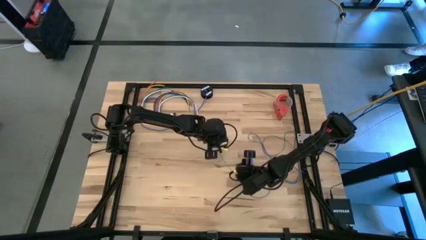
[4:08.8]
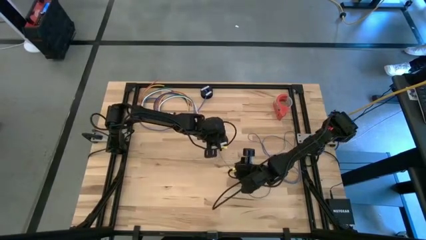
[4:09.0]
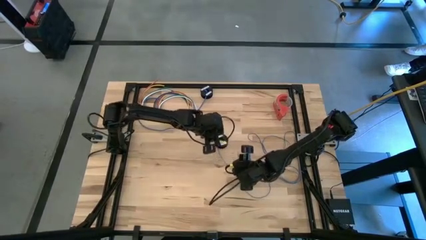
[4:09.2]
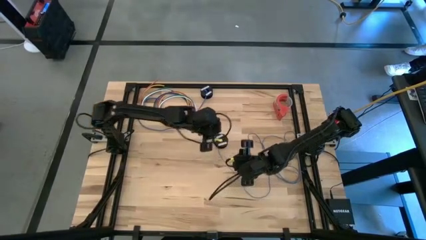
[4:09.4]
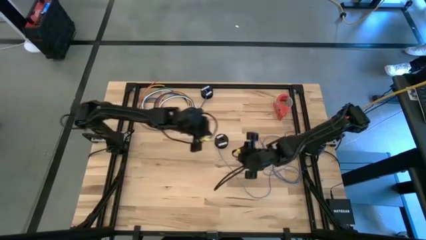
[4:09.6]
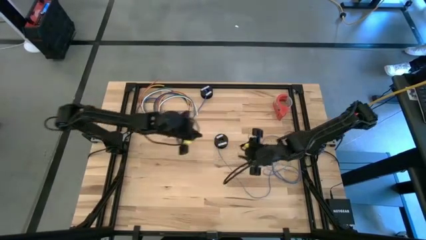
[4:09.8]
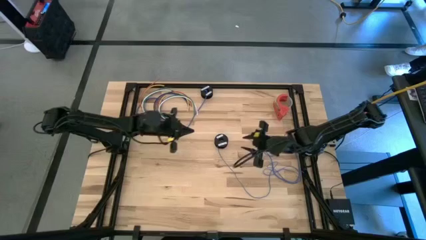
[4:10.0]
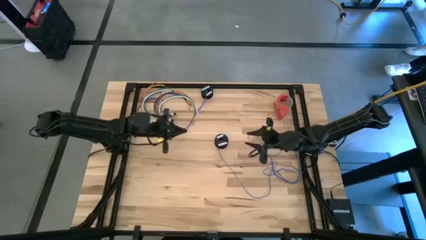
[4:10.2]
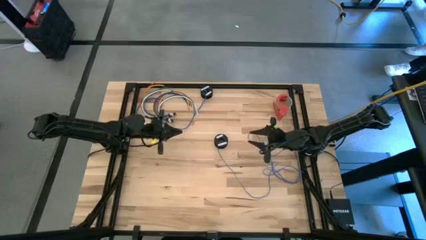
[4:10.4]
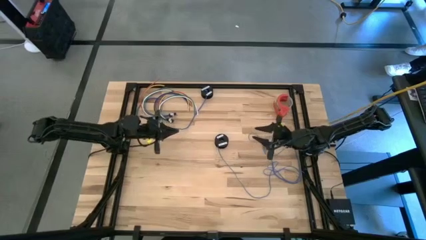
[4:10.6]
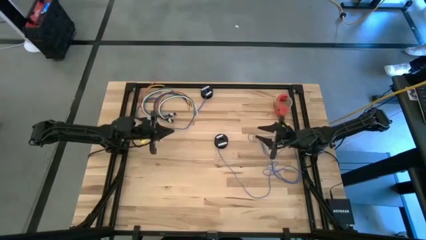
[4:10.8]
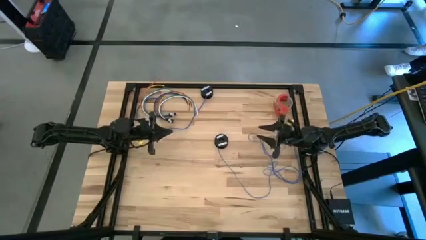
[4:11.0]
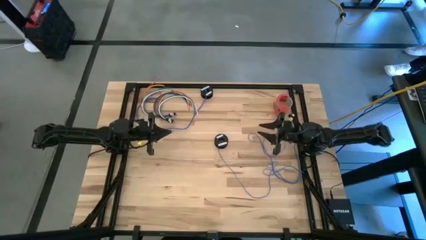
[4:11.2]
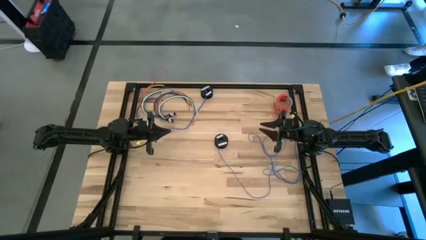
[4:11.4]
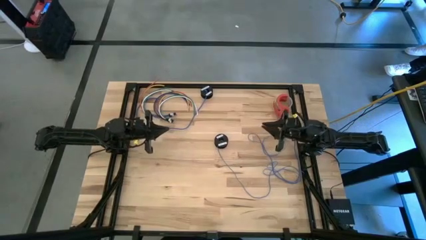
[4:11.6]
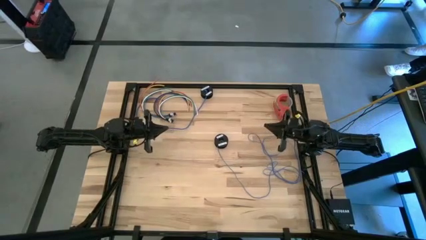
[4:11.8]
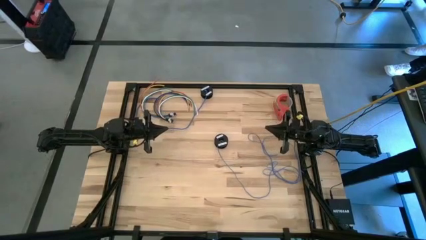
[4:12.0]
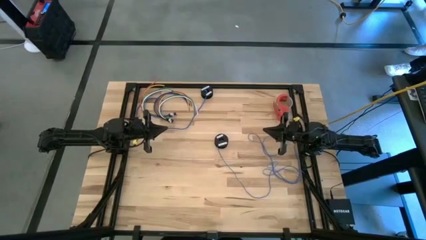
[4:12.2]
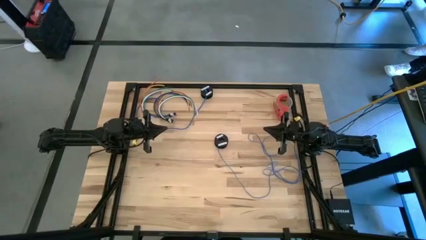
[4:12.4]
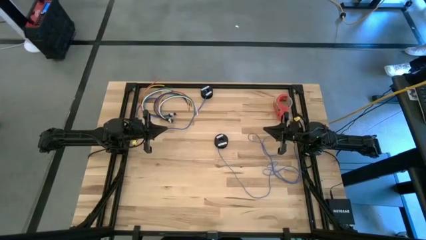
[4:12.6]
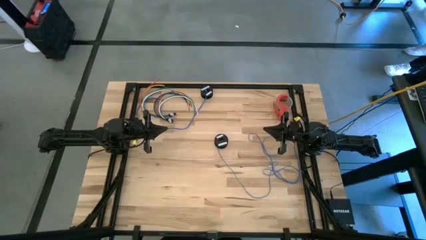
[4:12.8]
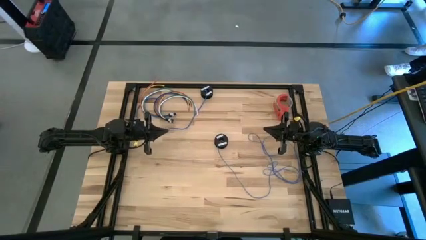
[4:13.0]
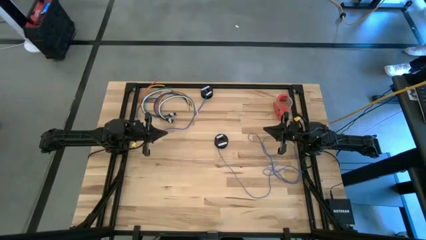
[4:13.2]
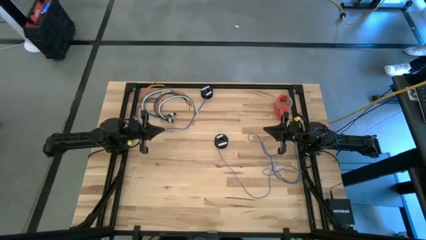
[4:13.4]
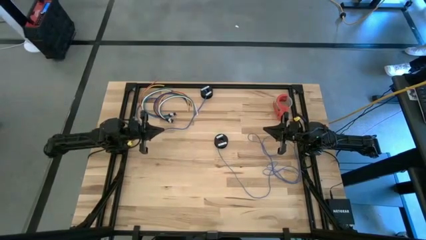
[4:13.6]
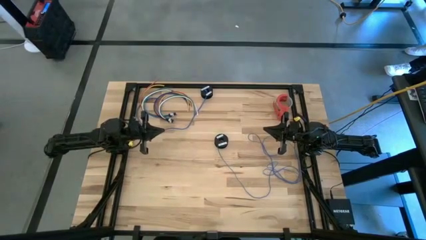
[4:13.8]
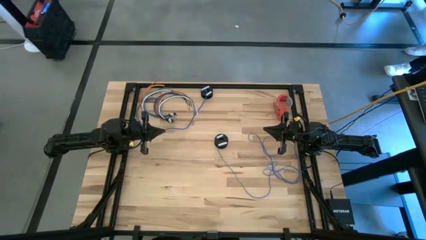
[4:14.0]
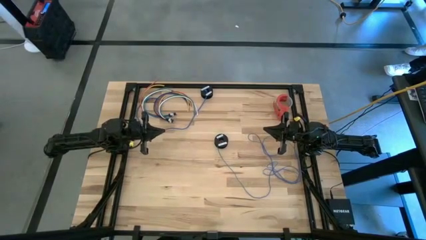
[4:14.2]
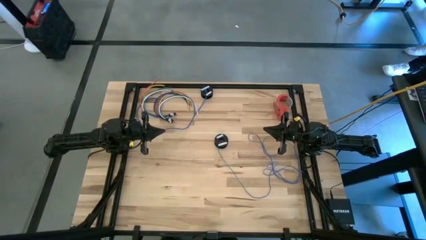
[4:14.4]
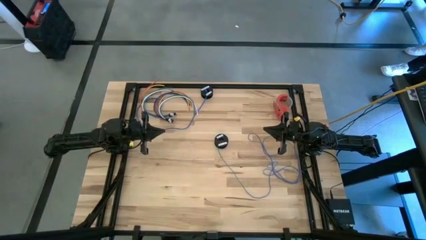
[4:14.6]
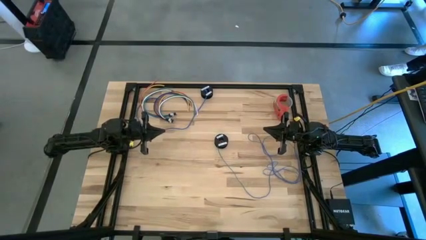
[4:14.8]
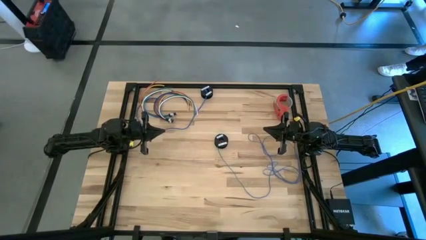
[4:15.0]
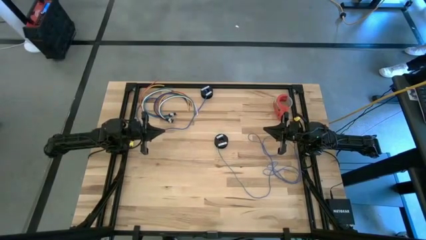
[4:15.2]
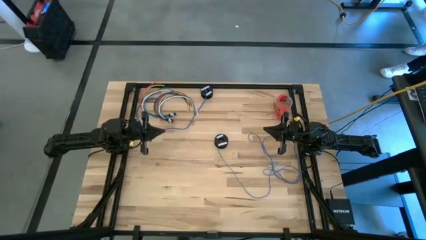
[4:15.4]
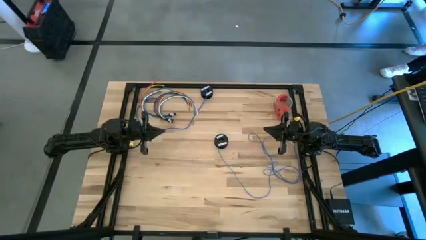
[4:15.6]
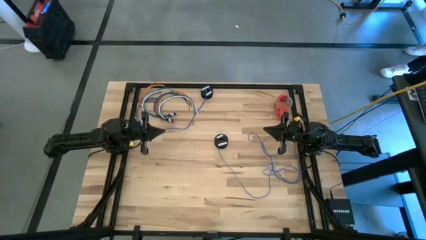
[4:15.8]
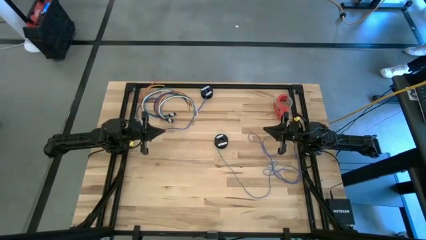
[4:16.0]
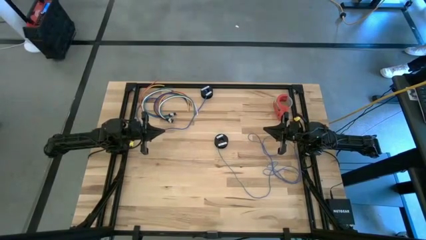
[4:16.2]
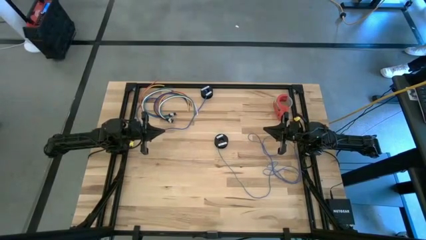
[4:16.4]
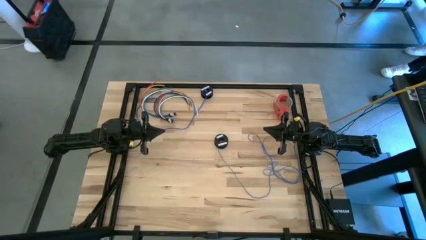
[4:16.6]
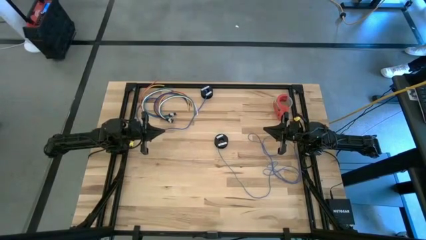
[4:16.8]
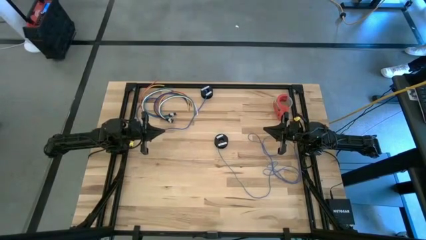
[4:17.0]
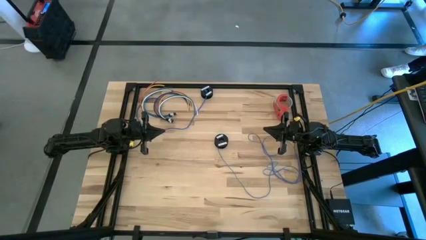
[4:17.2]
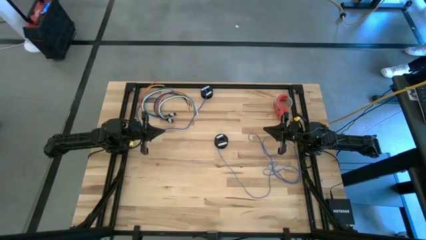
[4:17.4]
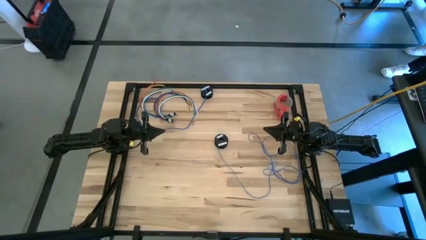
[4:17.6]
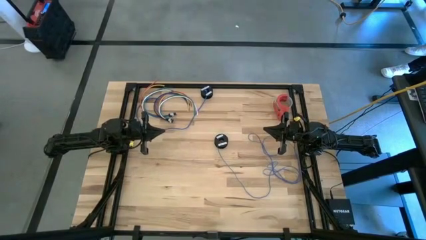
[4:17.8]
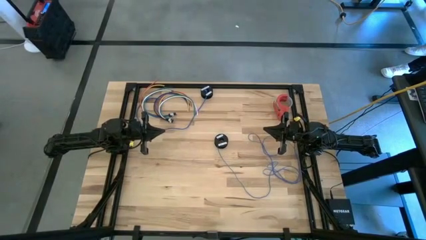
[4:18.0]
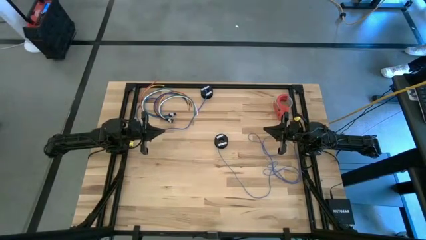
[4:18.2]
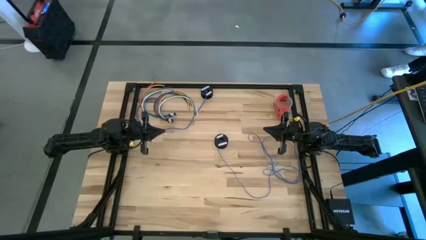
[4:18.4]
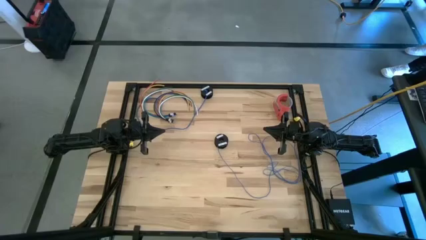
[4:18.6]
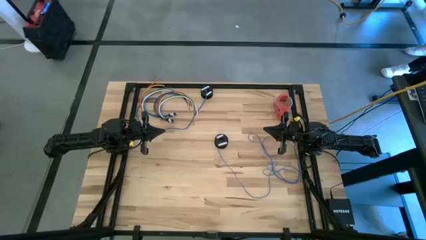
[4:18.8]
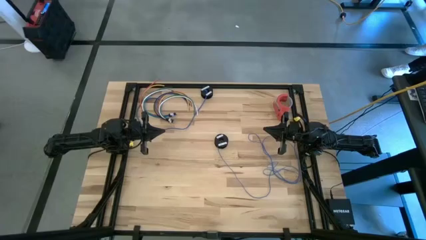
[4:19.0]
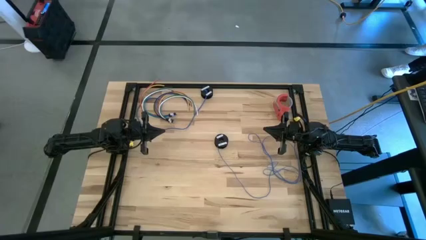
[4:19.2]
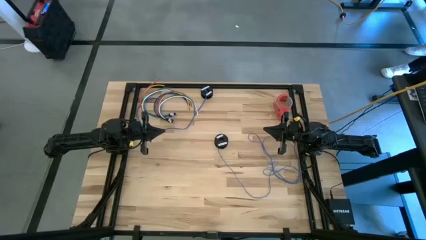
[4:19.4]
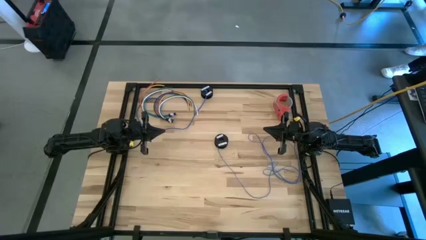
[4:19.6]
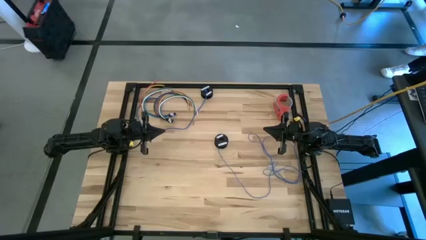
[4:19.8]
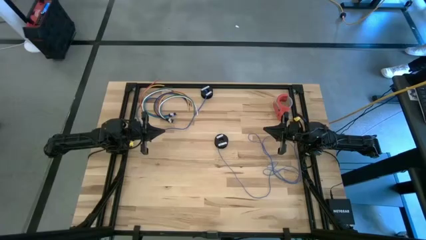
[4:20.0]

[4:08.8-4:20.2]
Task: Coil cords
Return to Home Position

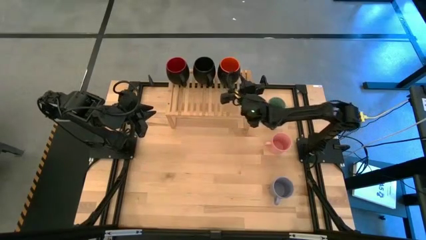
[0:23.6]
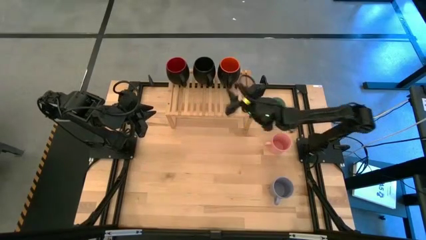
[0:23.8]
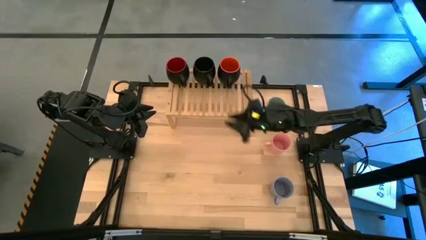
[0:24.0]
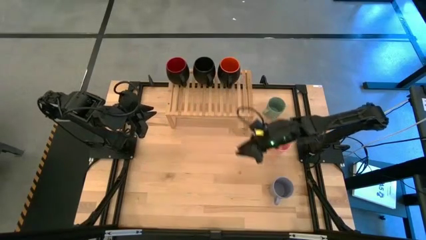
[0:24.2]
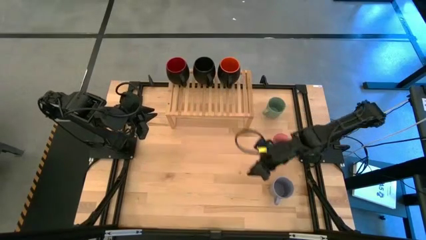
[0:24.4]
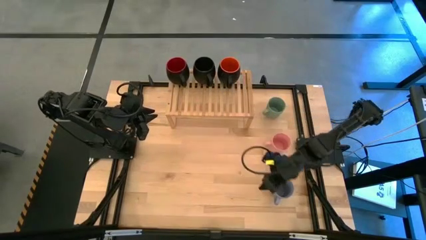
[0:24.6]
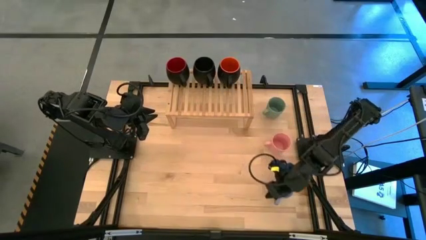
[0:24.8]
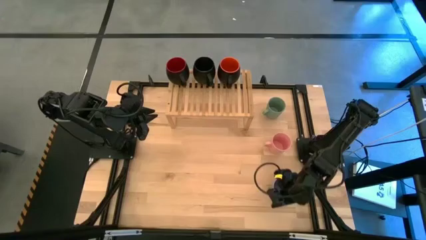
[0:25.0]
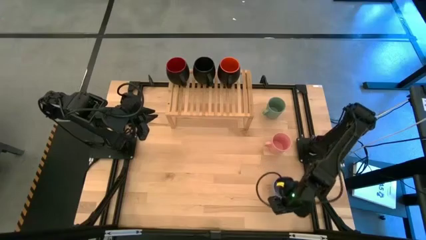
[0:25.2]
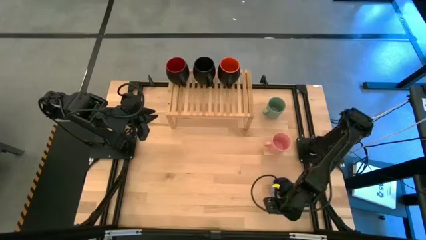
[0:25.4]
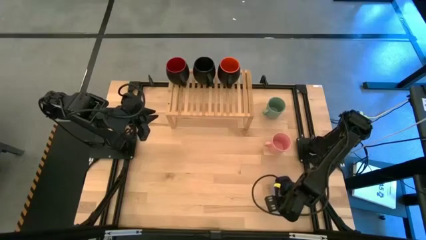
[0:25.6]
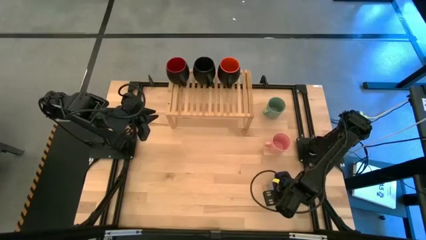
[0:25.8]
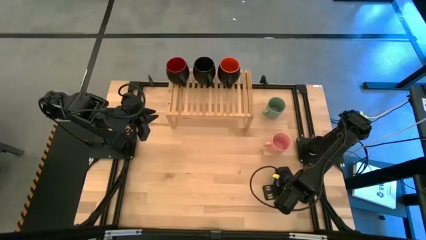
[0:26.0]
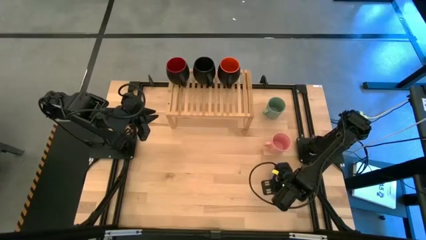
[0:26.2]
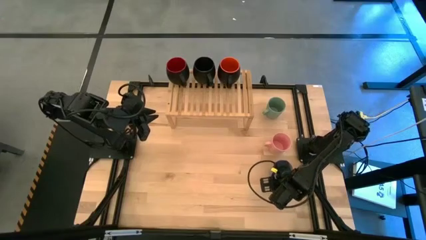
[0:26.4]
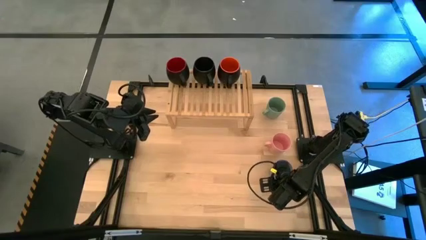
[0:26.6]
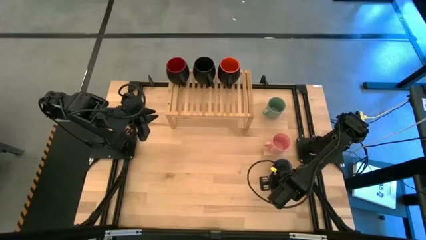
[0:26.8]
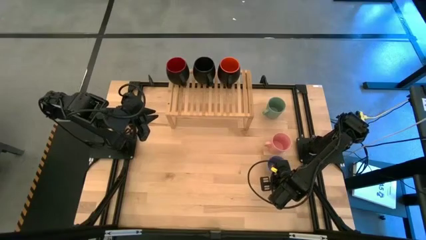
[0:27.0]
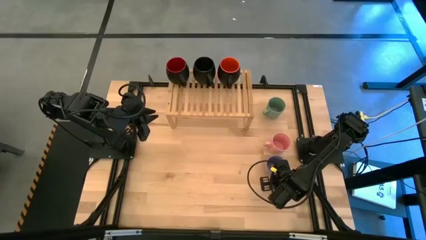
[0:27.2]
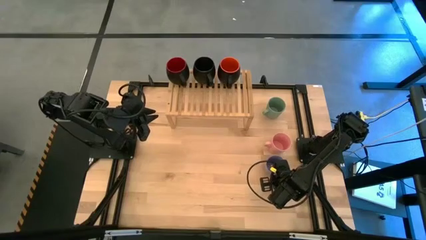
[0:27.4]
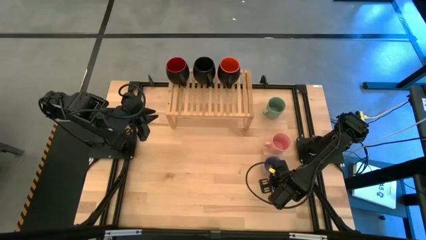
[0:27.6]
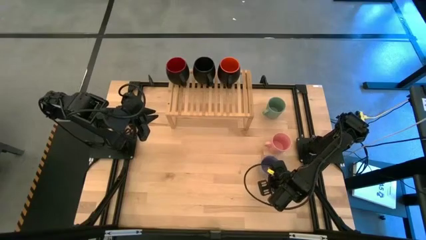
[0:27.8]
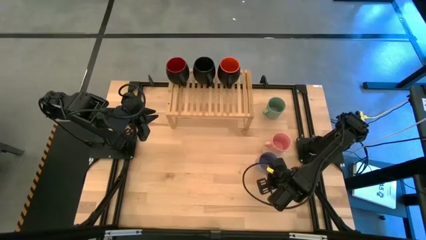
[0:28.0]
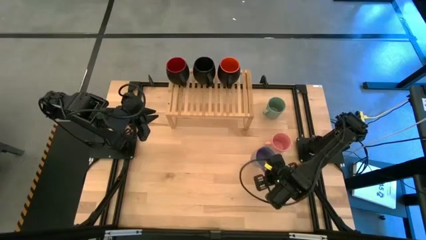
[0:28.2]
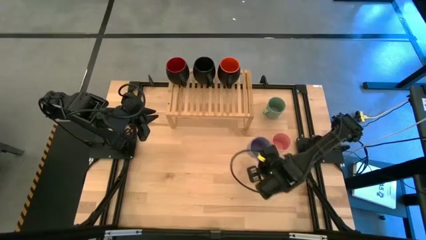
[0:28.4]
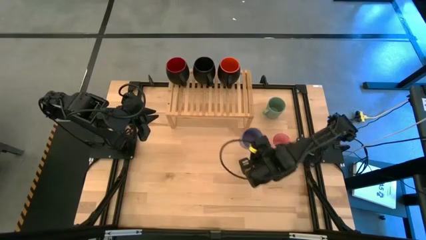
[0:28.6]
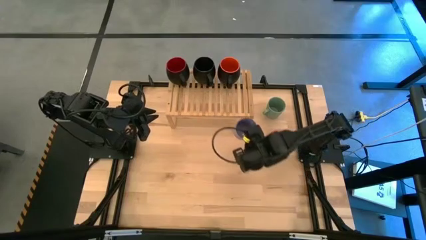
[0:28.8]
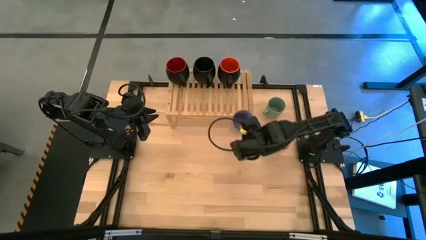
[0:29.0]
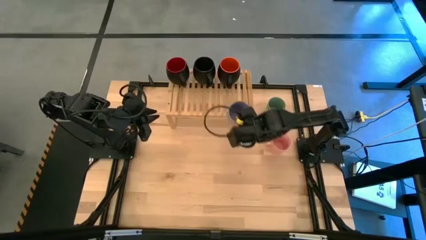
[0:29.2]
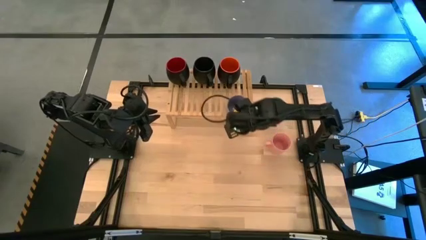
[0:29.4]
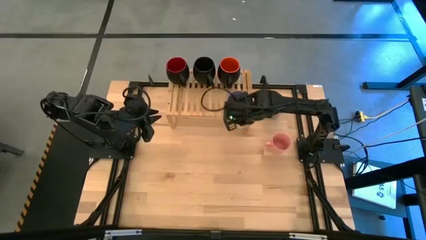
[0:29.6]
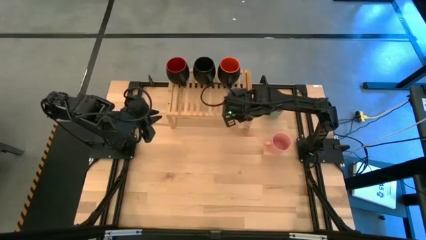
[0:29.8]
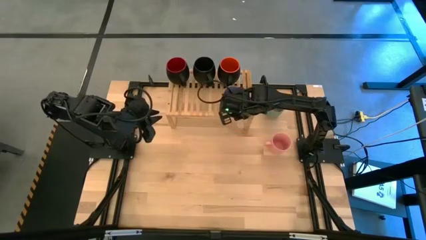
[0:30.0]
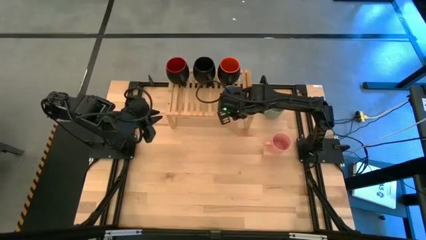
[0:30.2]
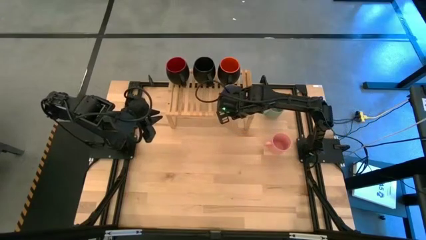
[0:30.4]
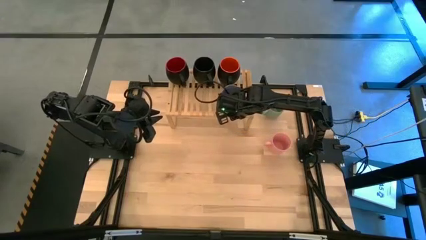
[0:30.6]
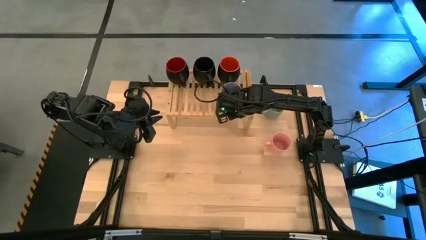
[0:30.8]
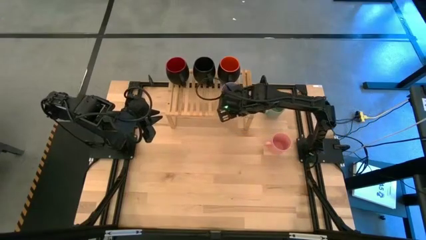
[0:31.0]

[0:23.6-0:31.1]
Task: Place coffee mugs
Put the purple mug the shelf
